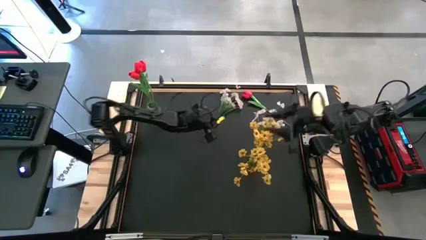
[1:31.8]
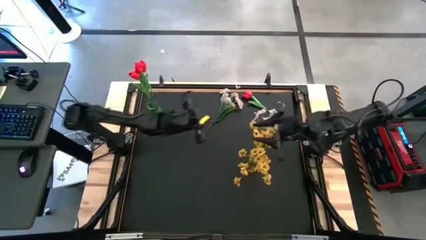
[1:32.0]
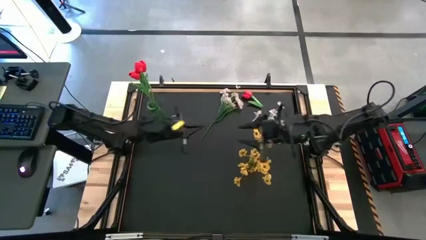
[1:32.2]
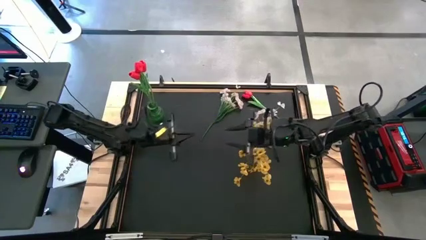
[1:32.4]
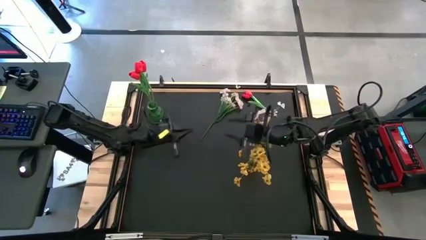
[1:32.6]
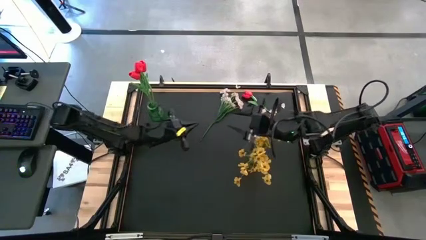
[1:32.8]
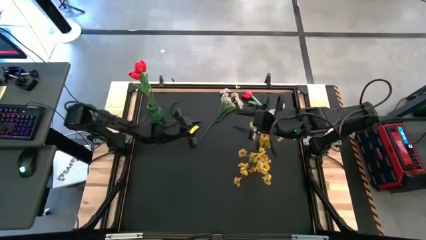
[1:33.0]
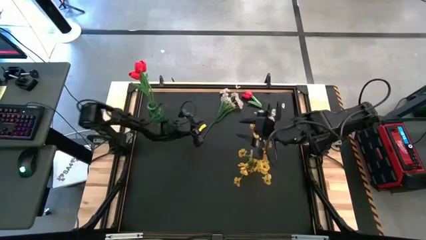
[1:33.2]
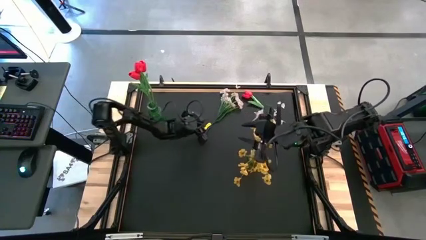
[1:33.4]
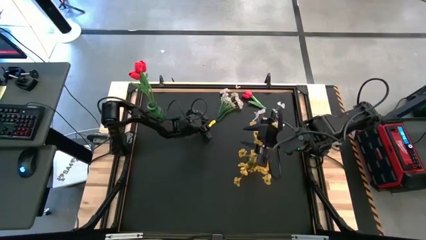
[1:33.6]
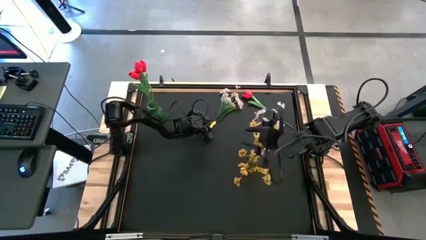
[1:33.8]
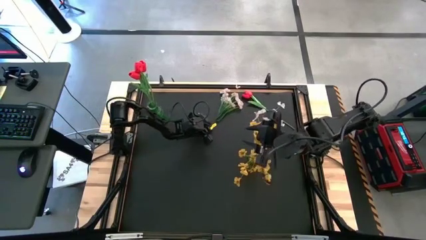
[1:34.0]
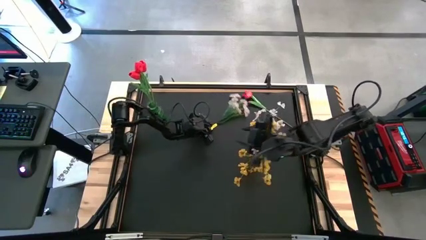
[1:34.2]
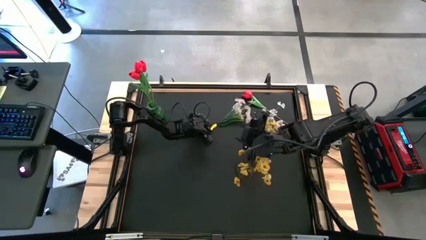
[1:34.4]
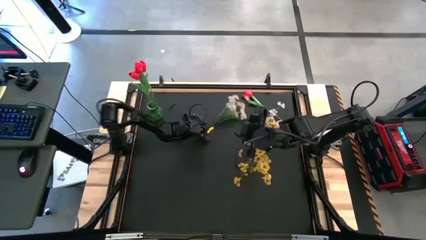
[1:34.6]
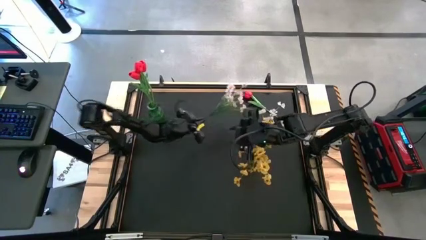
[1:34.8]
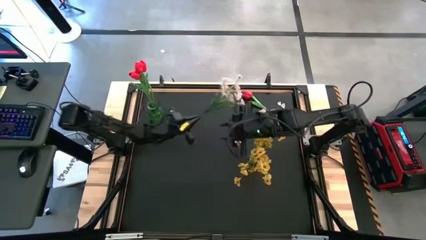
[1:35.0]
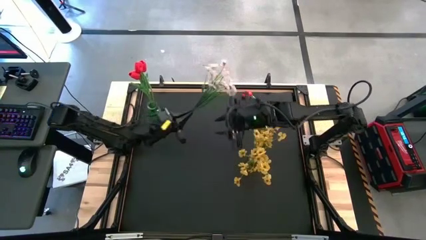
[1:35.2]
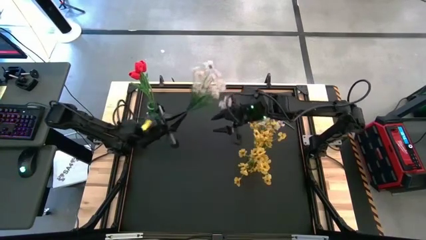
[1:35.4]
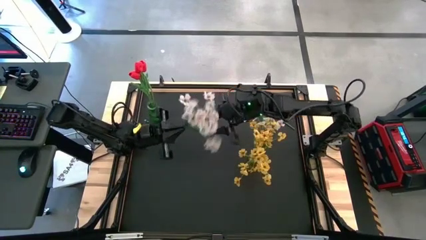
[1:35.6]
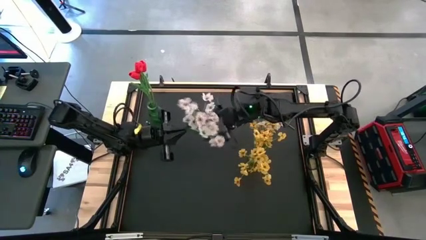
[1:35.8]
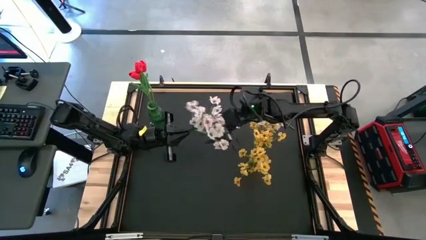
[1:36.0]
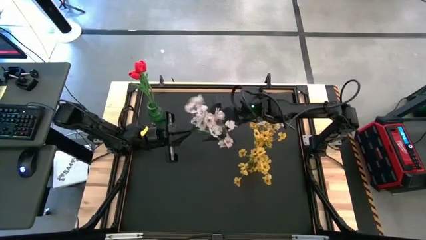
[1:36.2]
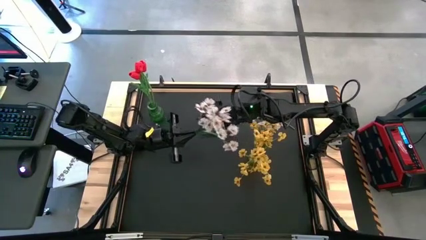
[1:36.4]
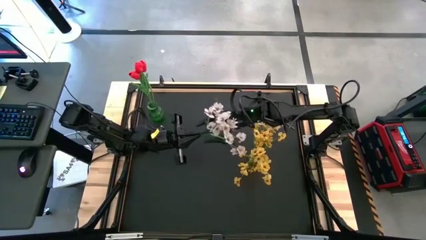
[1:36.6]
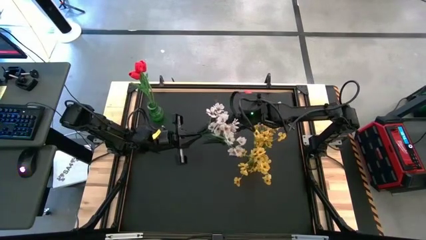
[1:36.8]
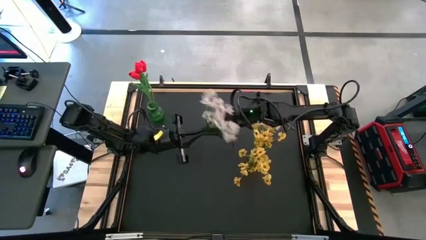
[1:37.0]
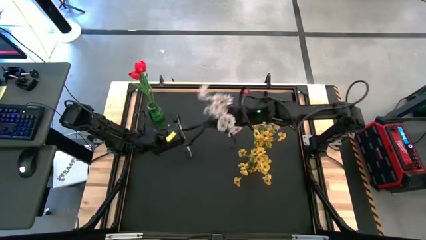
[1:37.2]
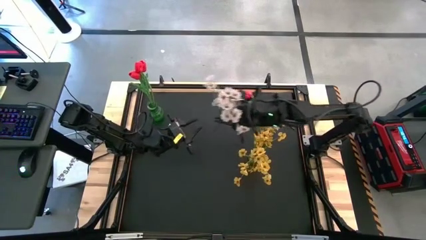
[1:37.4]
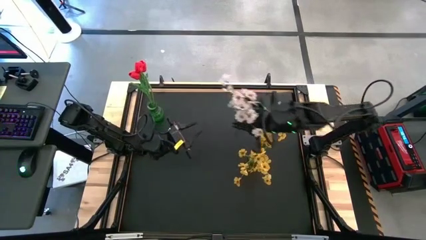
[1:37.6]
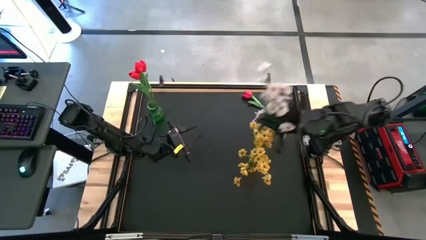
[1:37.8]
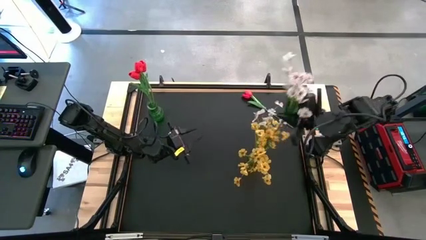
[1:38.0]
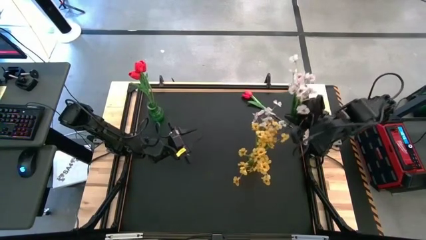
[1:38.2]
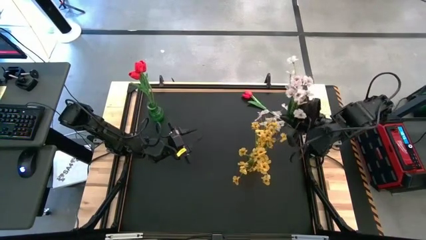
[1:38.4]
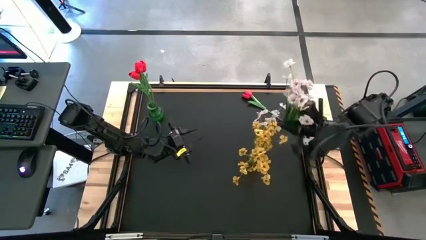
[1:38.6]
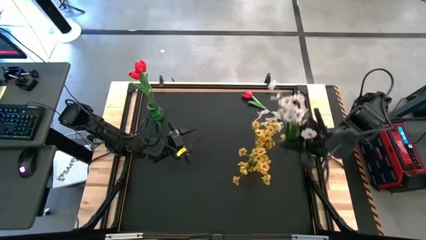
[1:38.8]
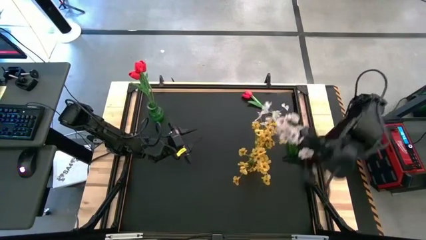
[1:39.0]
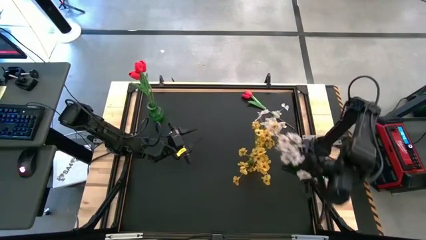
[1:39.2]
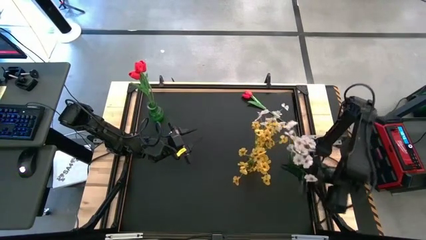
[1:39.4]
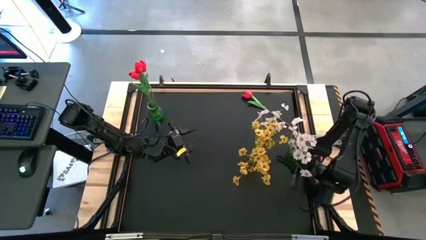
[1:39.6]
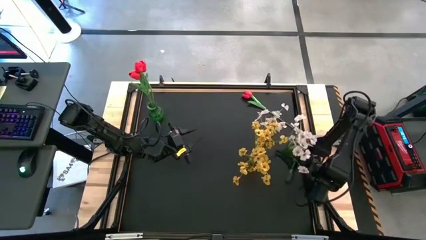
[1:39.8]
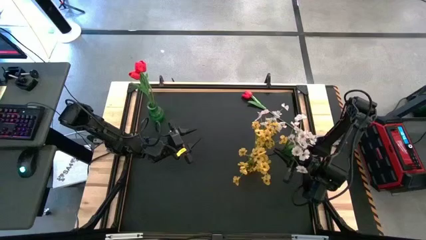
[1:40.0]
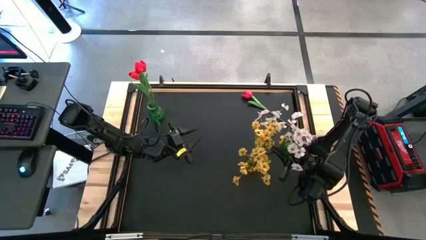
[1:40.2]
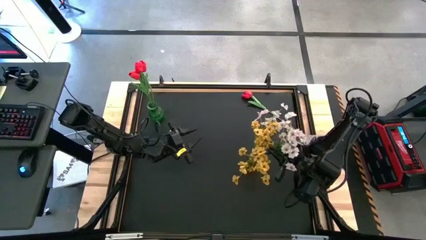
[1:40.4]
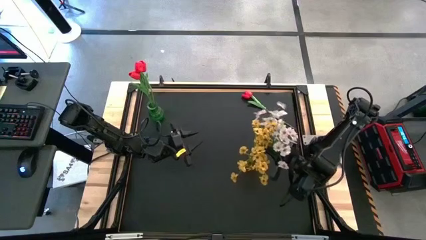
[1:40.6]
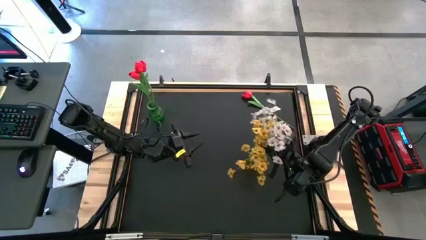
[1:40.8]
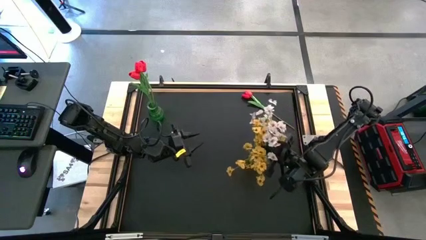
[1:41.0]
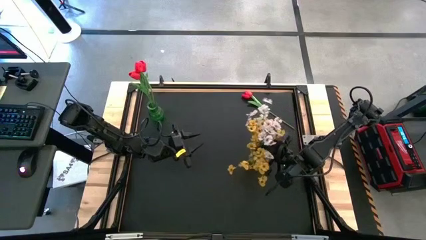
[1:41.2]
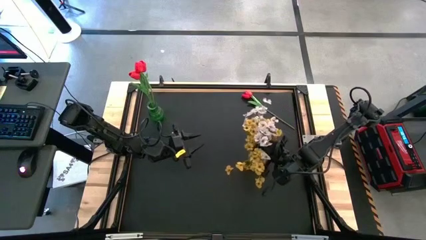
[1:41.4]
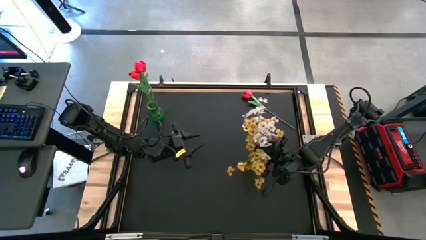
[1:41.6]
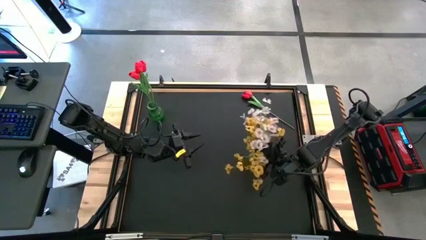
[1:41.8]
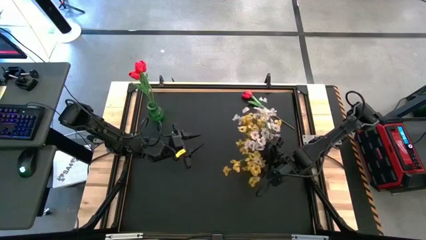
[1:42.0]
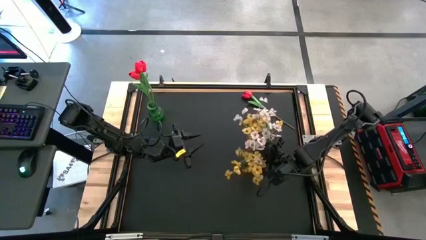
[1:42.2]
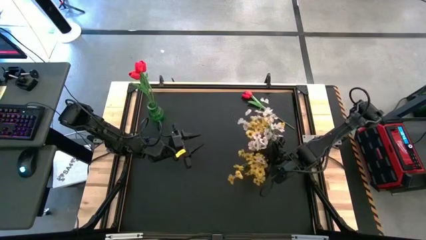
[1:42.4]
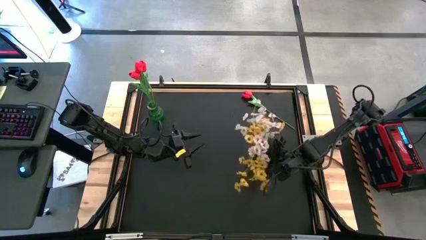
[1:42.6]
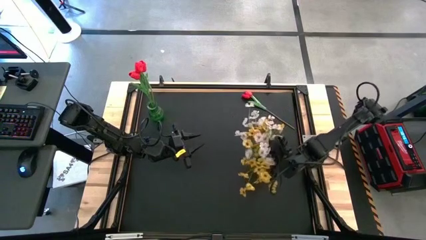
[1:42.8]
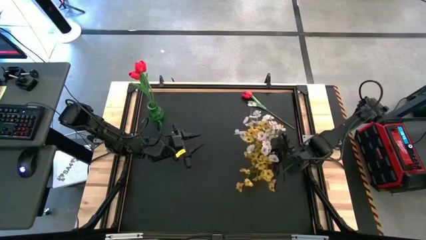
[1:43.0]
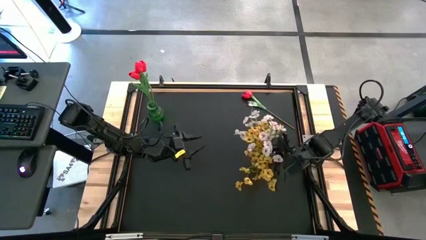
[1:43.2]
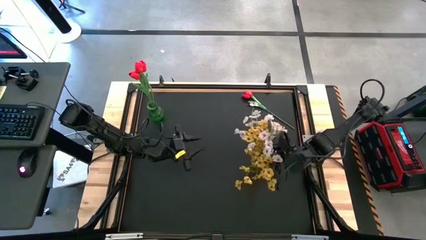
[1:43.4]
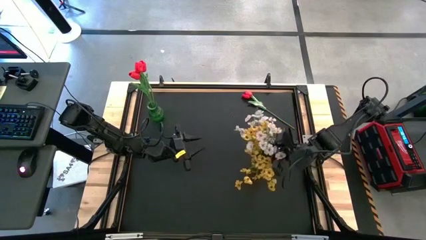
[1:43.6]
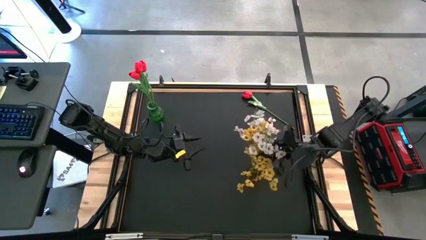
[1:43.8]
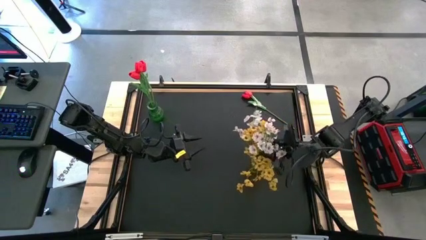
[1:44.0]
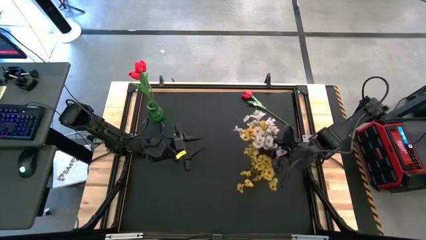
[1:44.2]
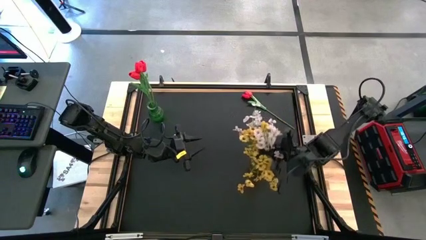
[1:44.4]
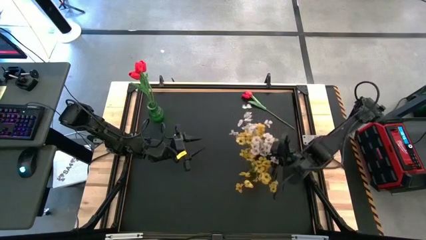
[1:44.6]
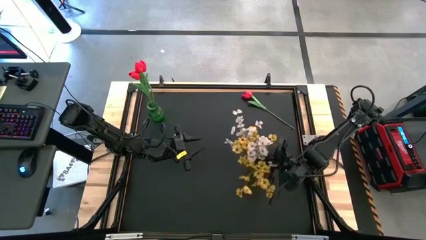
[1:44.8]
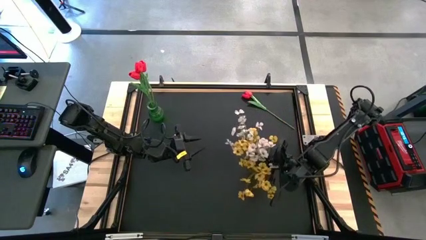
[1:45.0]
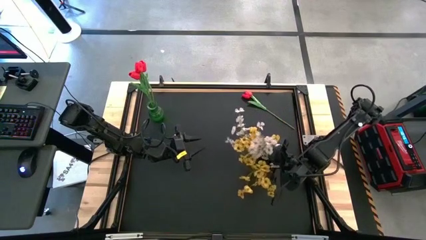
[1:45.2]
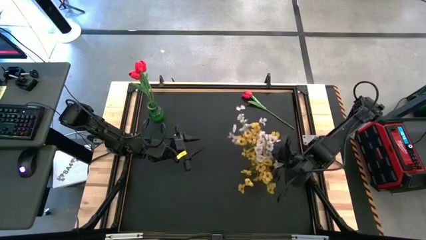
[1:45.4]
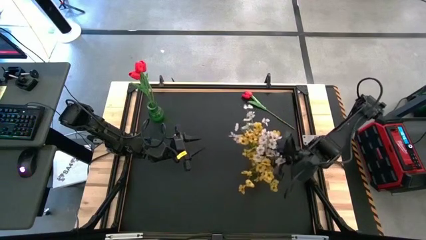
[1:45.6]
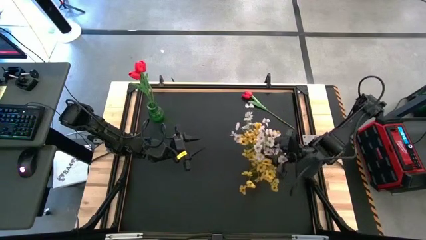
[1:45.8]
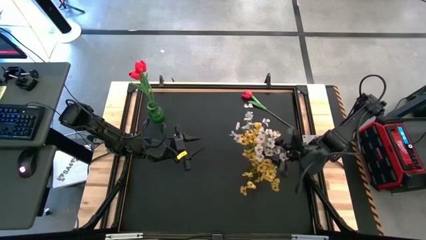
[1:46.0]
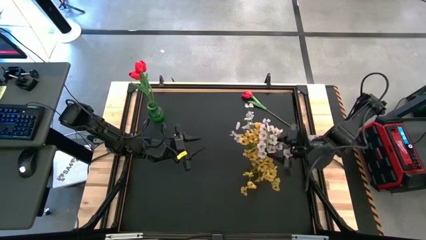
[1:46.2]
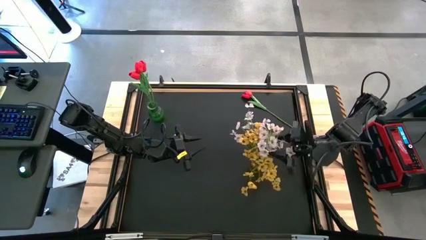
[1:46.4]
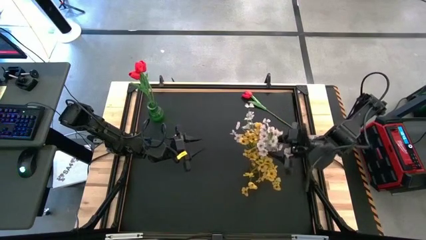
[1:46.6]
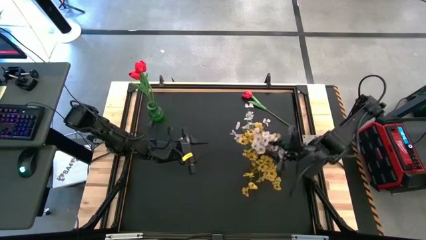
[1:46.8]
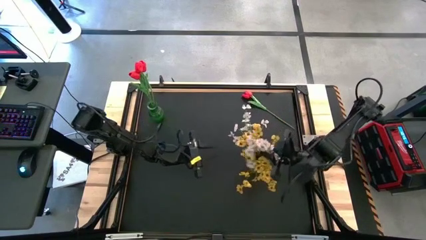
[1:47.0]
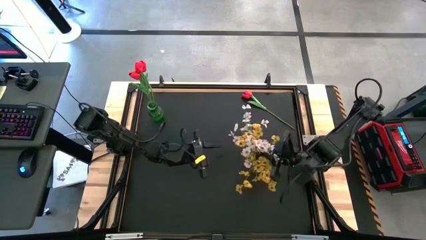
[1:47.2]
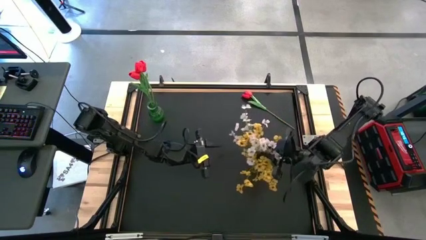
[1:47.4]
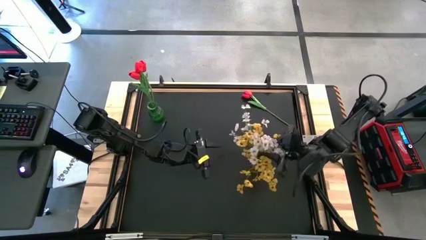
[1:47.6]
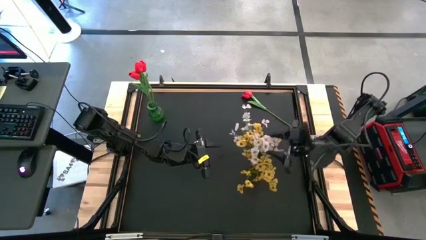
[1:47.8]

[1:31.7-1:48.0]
Task: Sort flowers into vase by color
Put the white flower into the yellow vase
